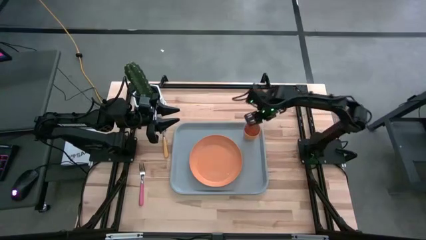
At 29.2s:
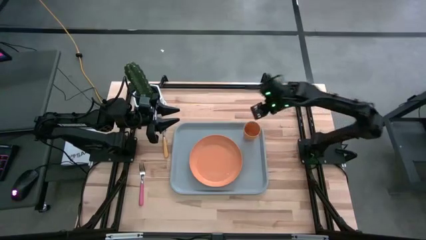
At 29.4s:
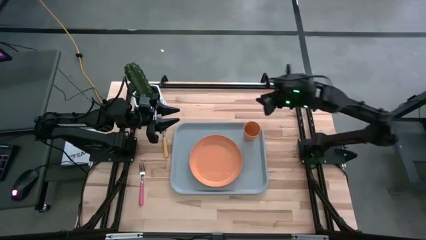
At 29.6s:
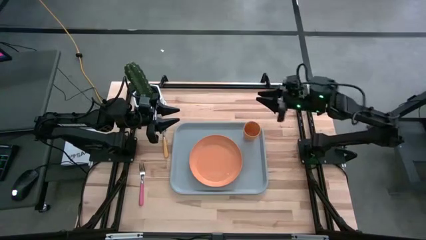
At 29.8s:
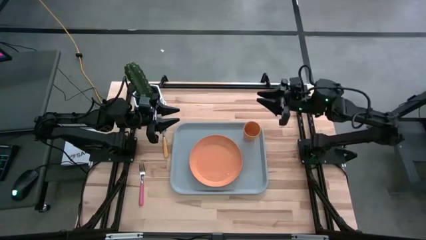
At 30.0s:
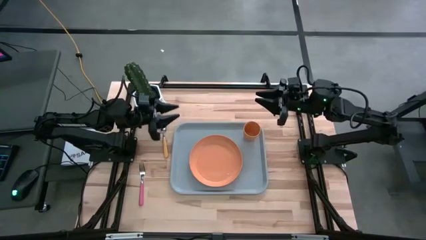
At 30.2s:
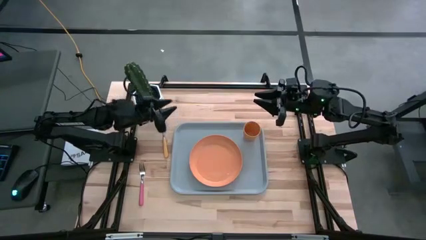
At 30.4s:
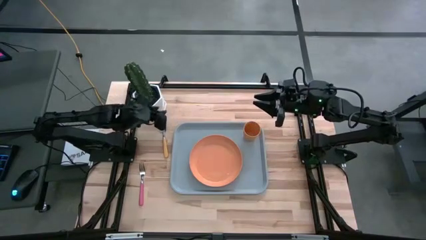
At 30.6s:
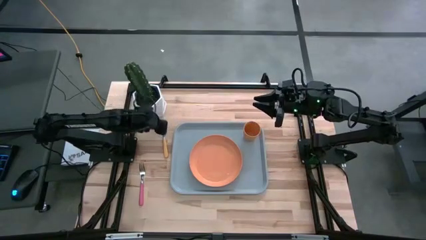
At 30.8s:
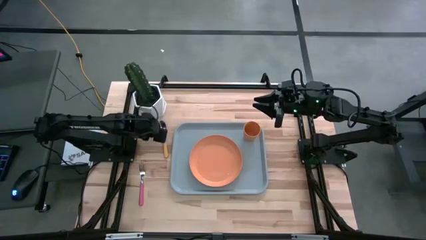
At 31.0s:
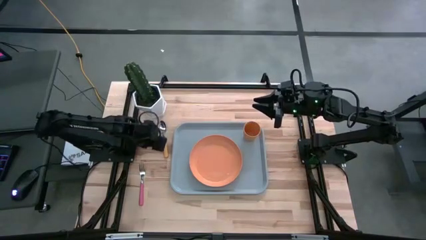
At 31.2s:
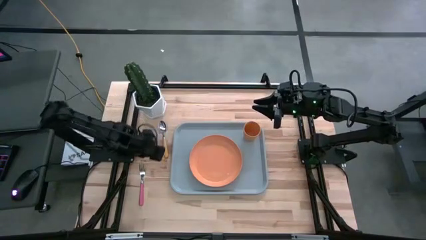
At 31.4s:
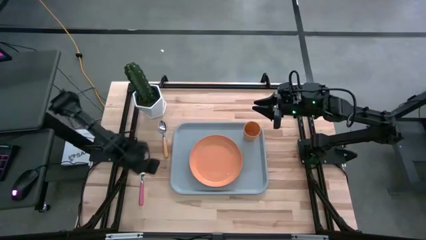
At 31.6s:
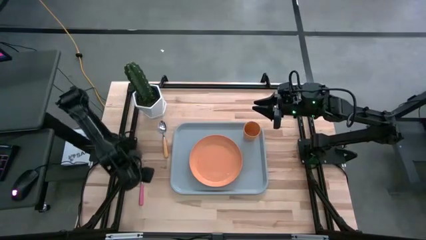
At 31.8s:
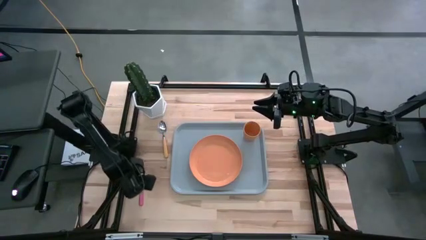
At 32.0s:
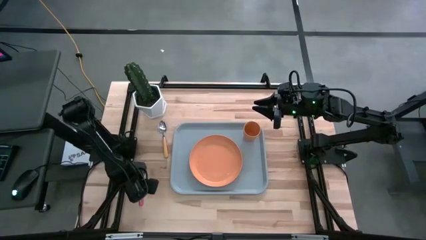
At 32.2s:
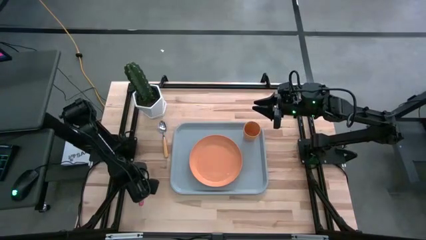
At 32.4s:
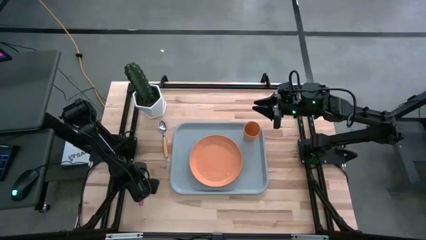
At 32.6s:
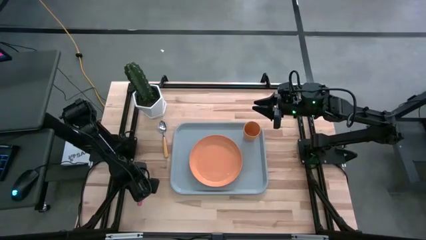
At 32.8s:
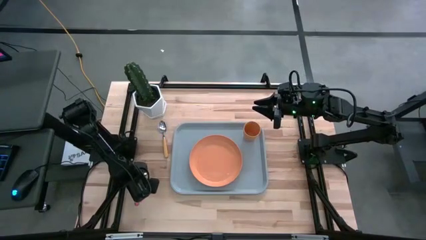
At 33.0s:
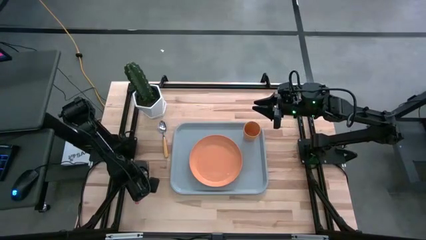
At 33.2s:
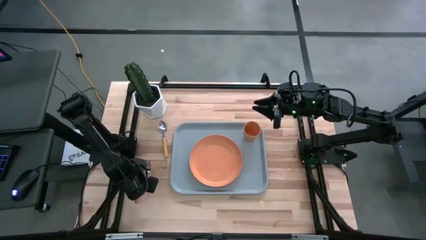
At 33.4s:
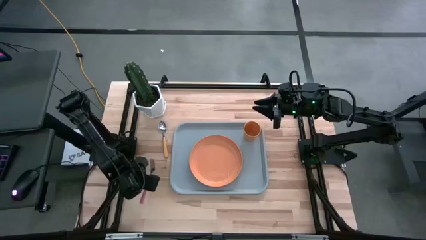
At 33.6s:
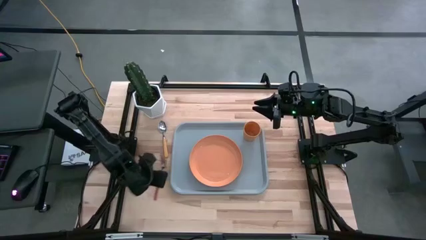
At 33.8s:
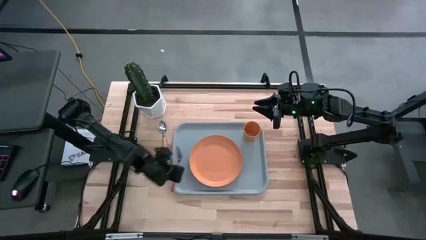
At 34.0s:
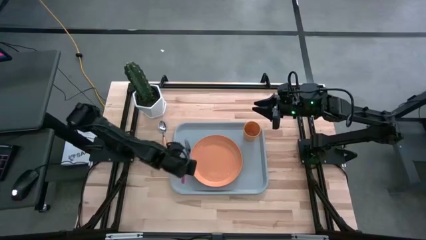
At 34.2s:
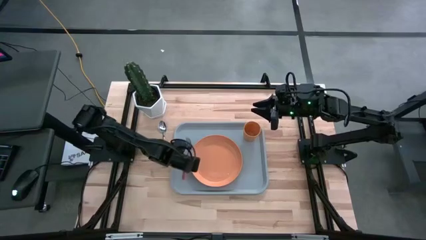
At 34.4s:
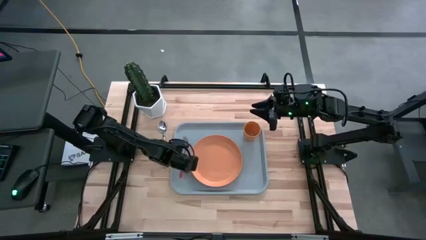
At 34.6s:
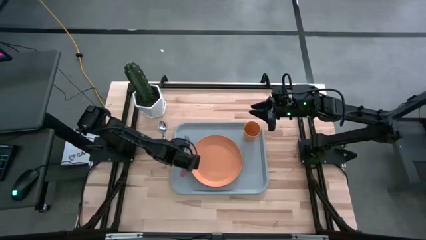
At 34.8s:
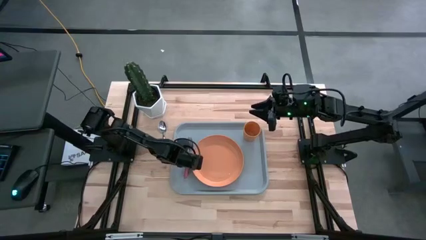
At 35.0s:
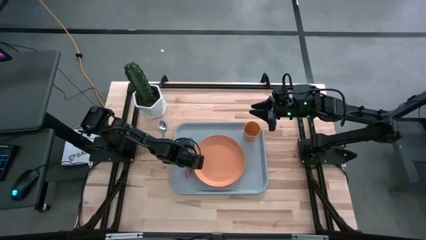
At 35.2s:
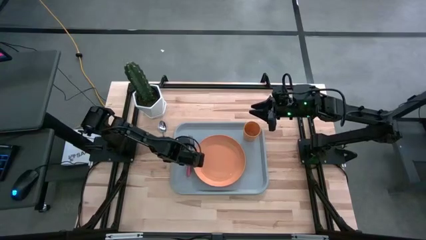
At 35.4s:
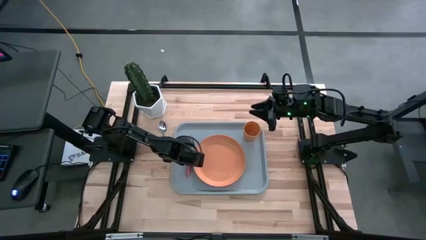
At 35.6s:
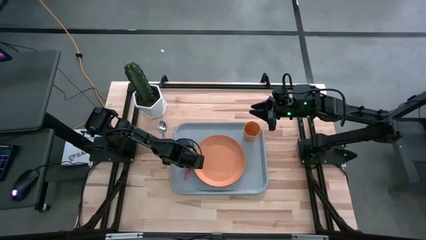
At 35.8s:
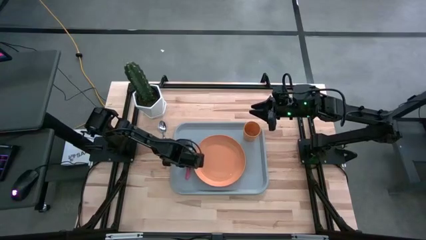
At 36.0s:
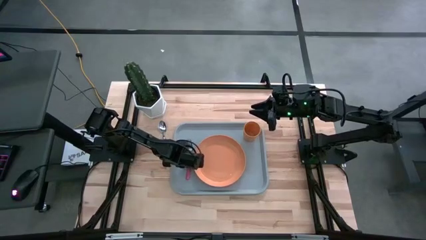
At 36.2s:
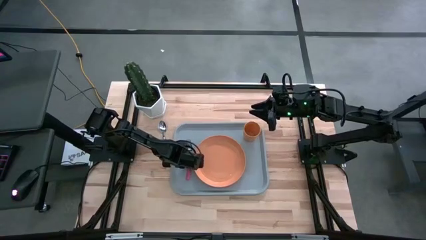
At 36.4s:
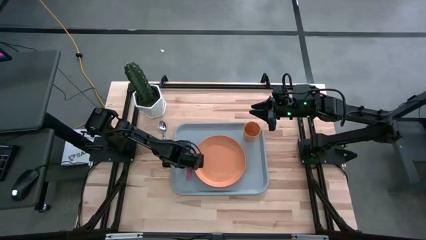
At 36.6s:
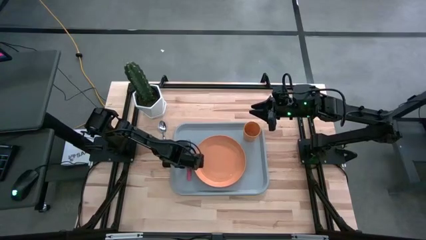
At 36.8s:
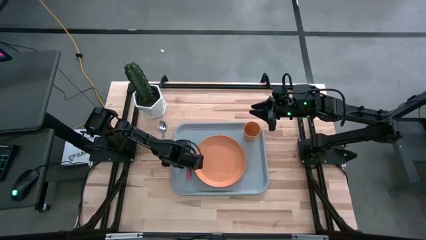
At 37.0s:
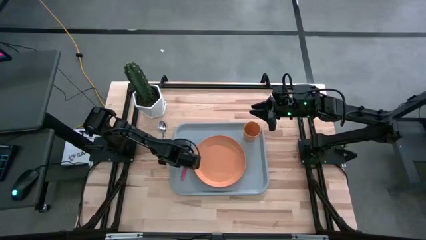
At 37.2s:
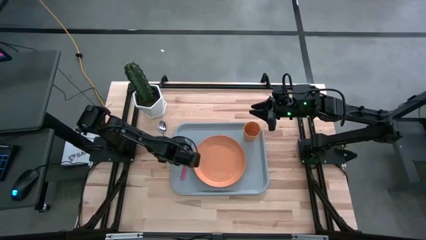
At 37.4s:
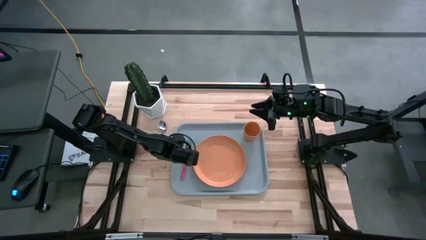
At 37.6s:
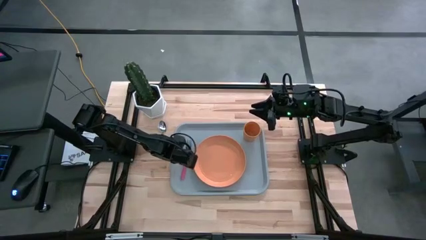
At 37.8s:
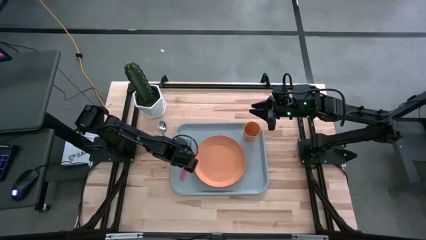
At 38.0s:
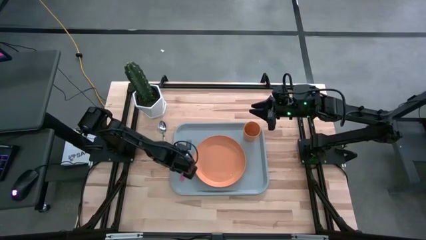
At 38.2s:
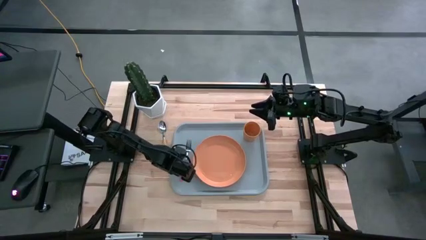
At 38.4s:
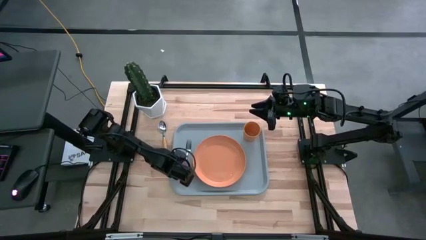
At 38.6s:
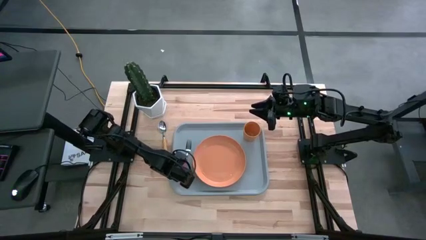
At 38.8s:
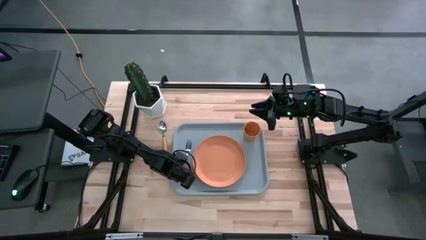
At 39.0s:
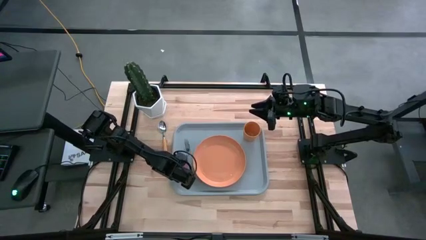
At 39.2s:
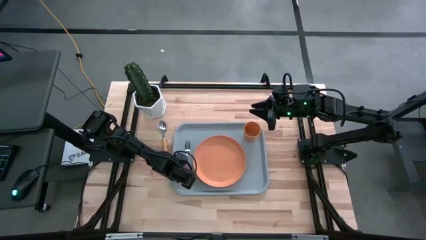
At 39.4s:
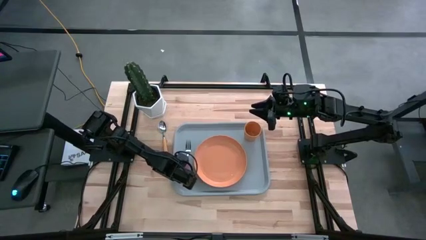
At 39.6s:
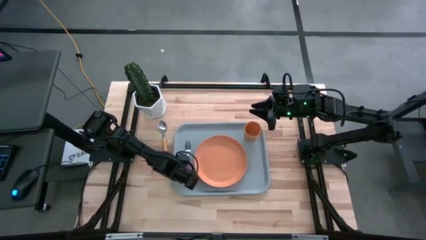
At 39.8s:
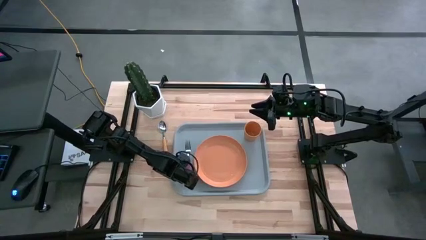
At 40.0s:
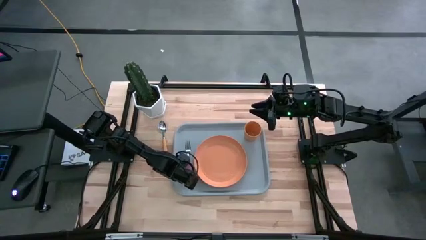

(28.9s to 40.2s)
Task: Pick and place plate/cup/fork/spoon on tray
Put the pink fork to the left of the orange plate on the gray tray

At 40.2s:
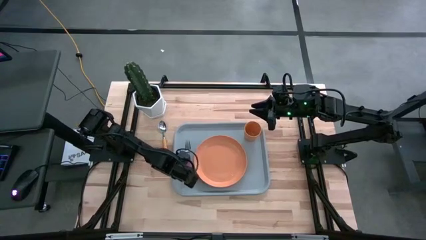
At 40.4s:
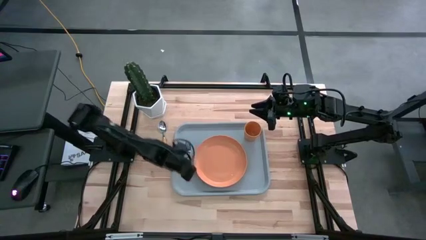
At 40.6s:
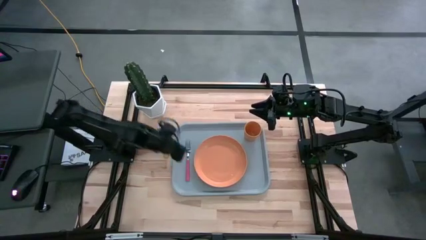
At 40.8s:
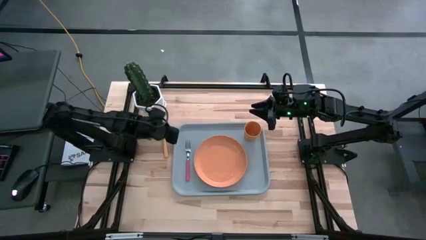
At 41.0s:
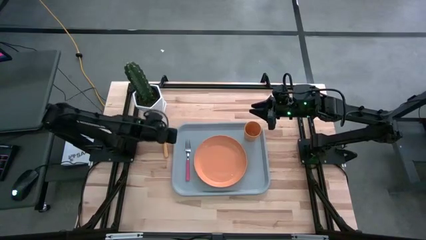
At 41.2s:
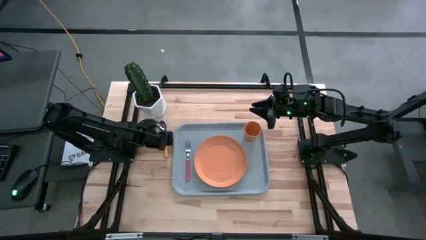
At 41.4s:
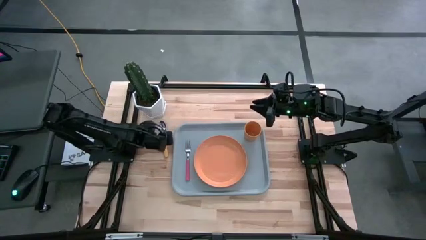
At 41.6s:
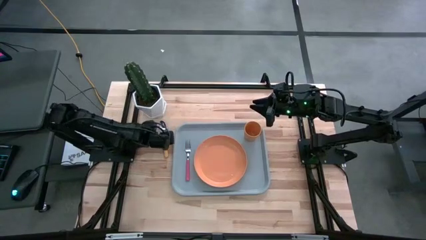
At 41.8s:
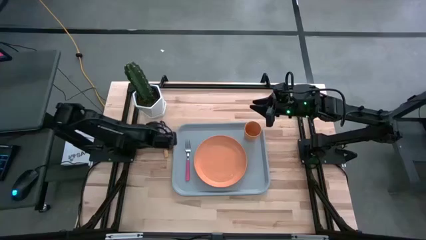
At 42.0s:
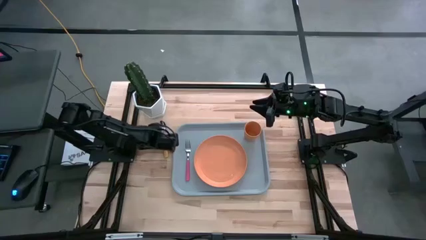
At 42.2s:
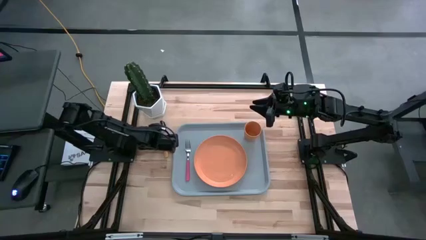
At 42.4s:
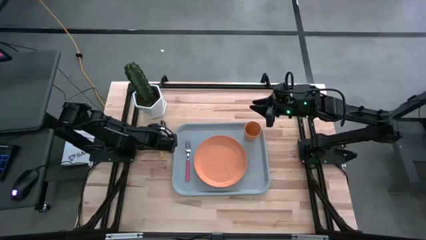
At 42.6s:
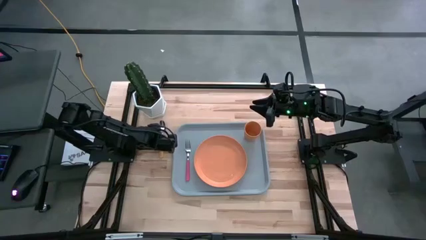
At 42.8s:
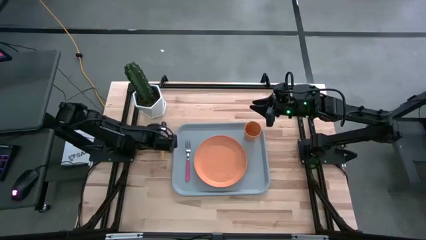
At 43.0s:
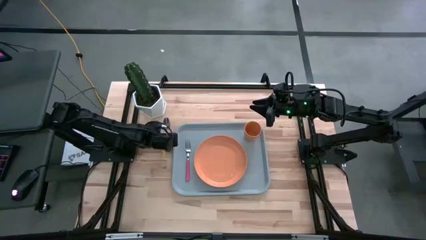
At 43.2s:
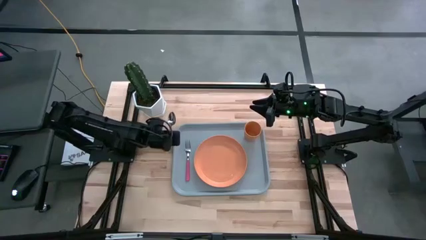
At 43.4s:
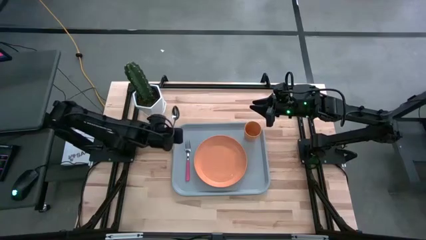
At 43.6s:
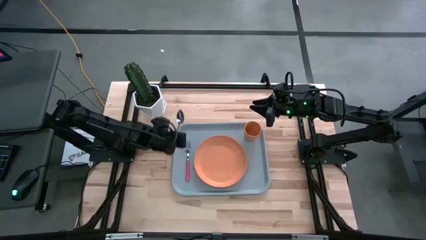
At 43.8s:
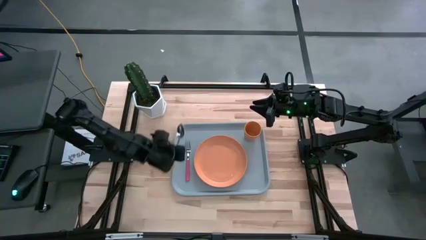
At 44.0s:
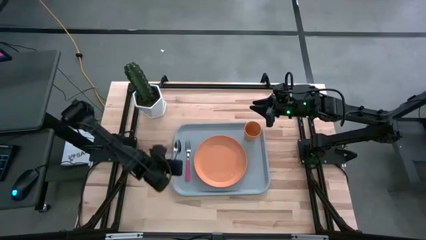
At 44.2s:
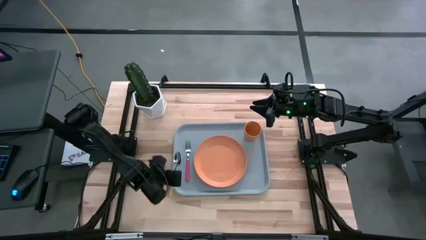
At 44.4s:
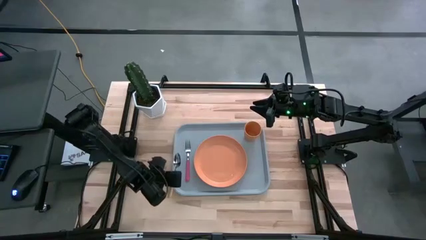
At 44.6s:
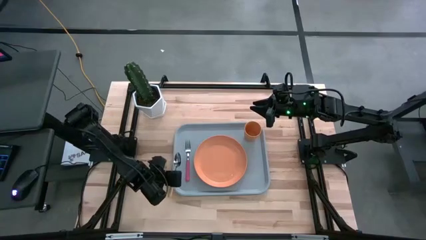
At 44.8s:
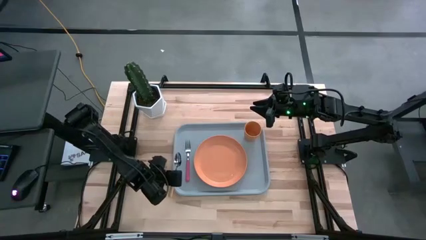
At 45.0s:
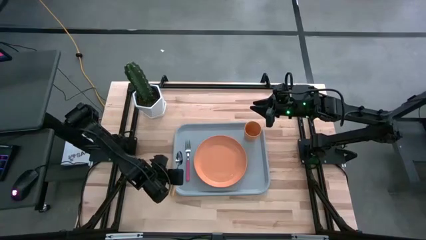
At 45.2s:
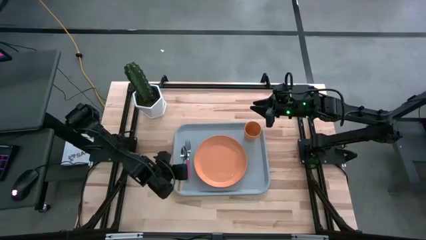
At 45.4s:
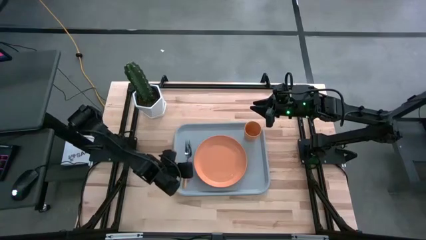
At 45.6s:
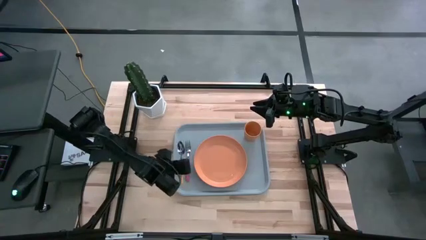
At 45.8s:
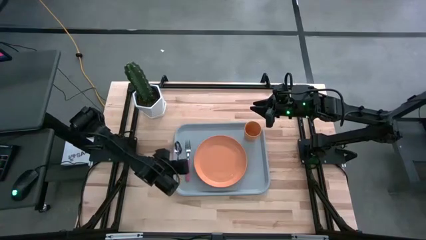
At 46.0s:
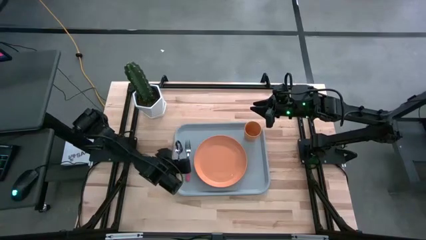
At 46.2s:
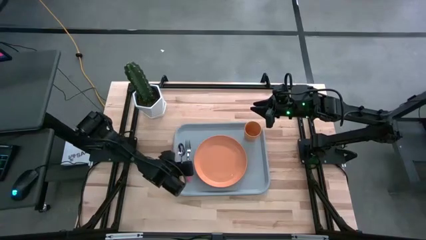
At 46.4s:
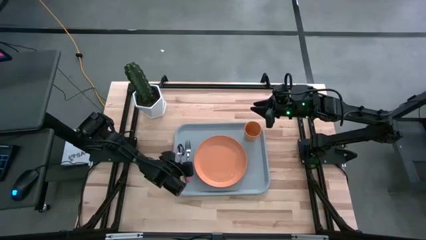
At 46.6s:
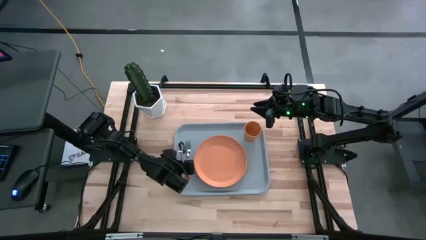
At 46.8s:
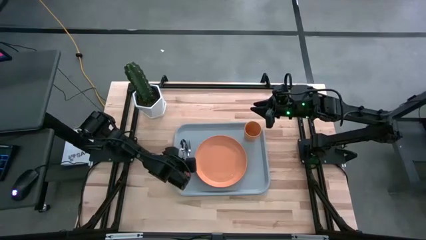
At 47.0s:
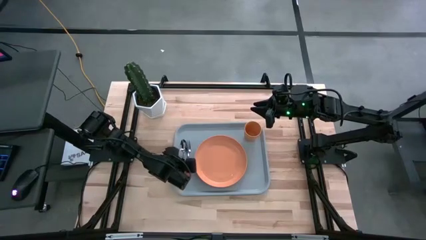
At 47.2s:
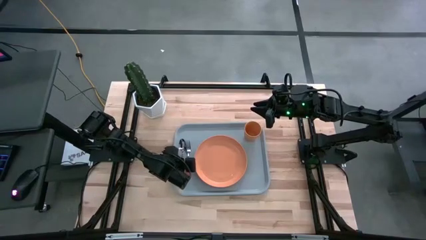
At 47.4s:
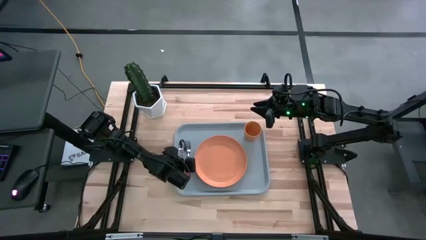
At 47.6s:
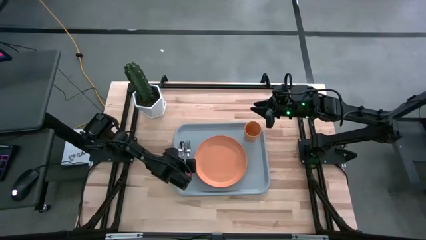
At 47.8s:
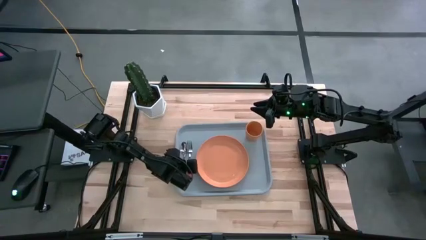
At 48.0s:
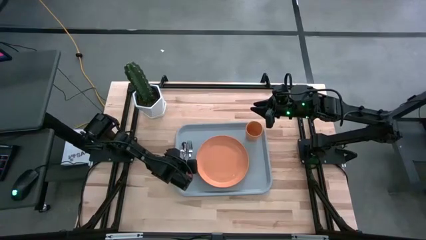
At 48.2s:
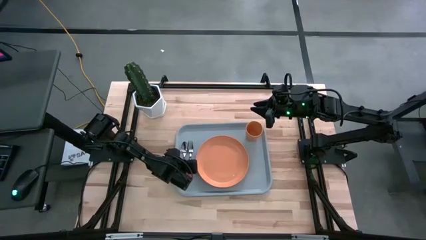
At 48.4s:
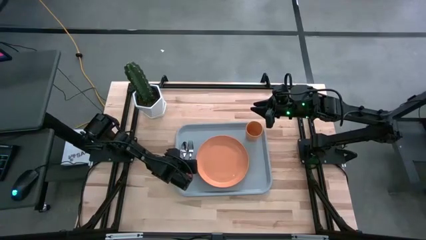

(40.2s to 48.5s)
Put the yellow spoon to the left of the pink fork on the gray tray
